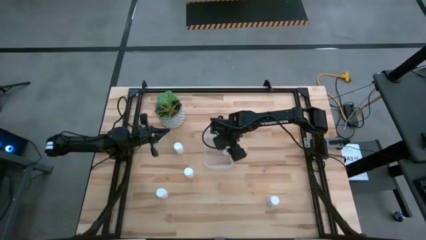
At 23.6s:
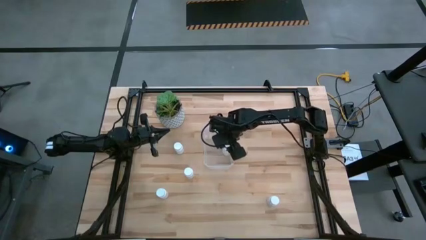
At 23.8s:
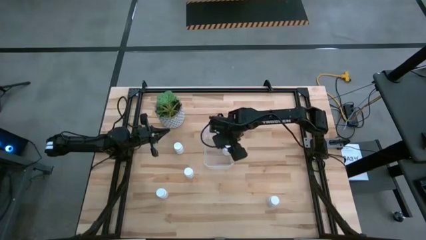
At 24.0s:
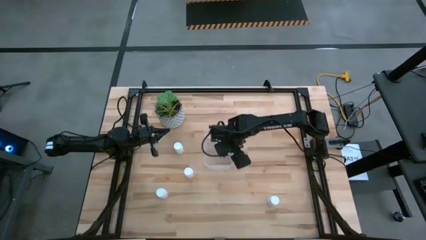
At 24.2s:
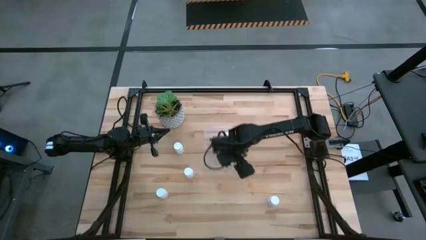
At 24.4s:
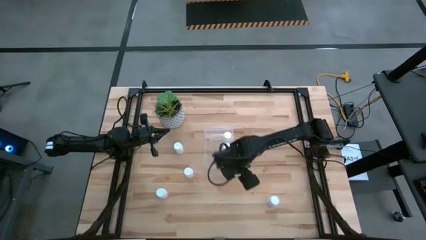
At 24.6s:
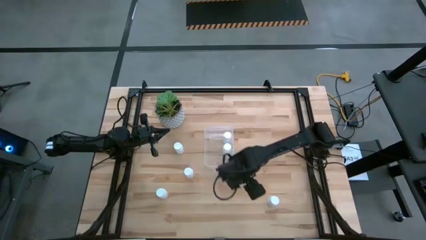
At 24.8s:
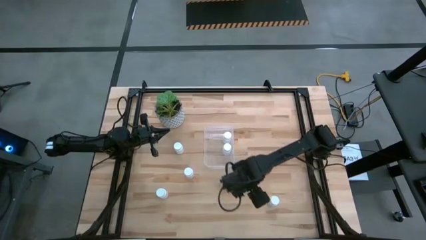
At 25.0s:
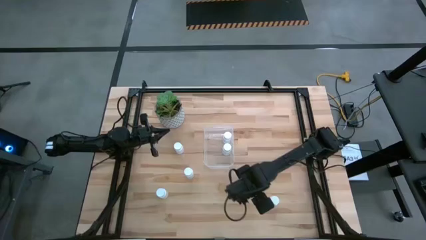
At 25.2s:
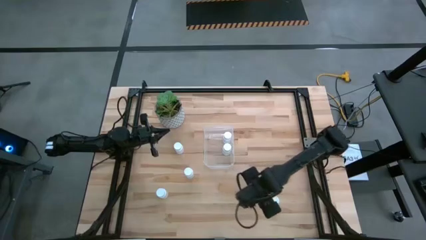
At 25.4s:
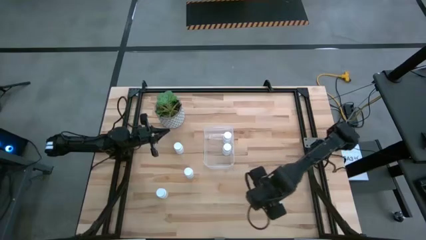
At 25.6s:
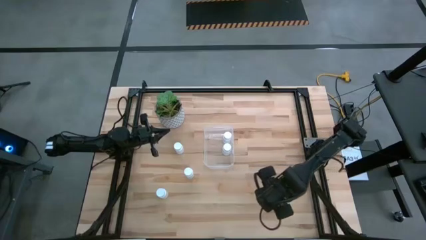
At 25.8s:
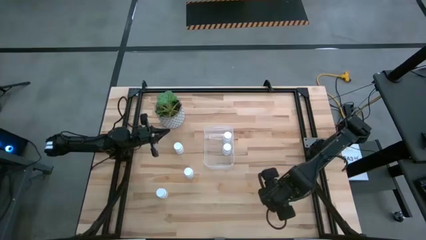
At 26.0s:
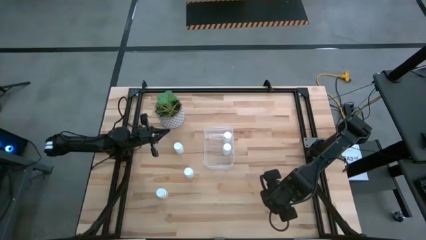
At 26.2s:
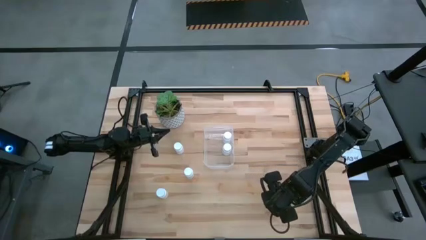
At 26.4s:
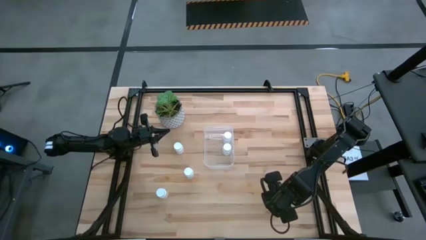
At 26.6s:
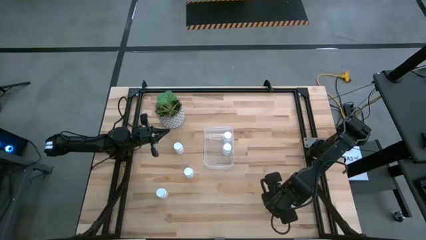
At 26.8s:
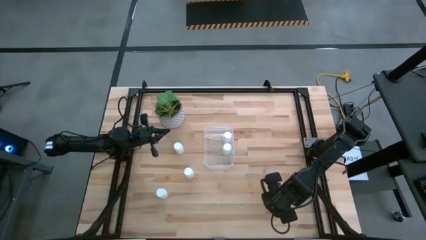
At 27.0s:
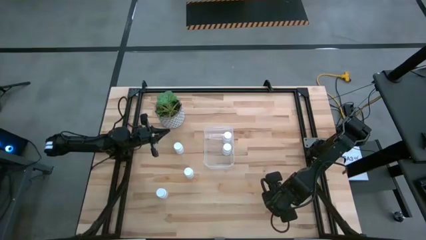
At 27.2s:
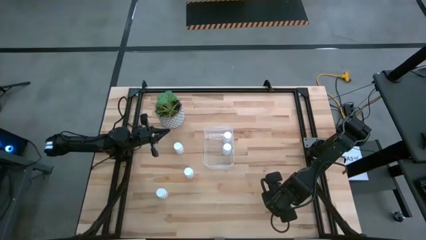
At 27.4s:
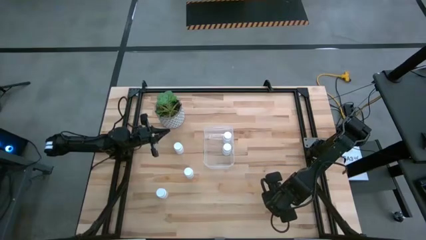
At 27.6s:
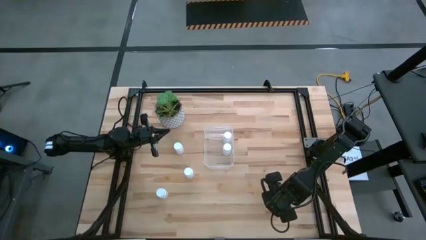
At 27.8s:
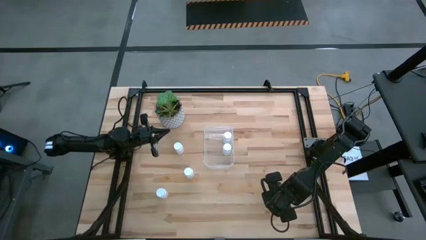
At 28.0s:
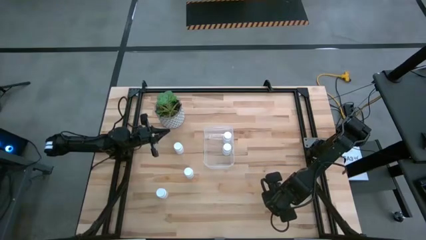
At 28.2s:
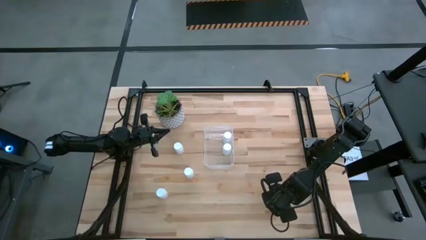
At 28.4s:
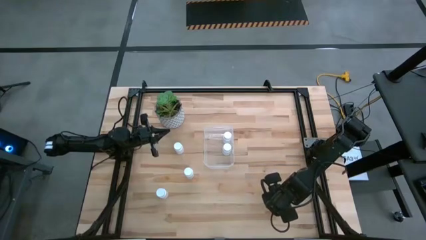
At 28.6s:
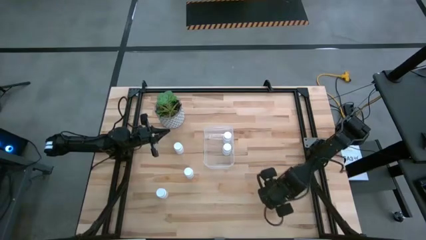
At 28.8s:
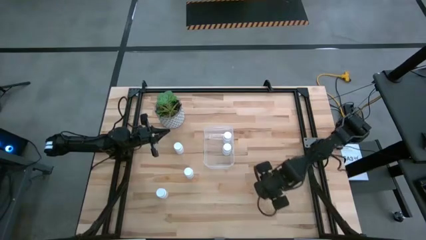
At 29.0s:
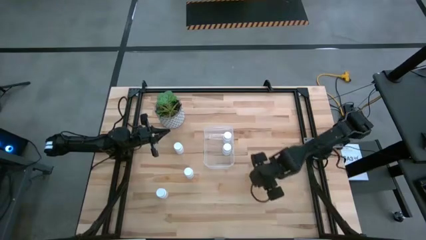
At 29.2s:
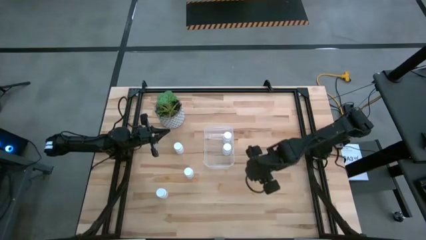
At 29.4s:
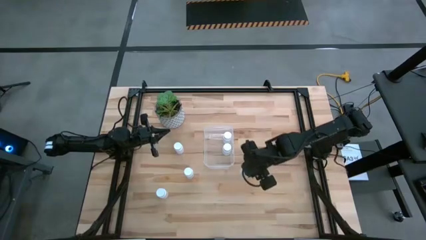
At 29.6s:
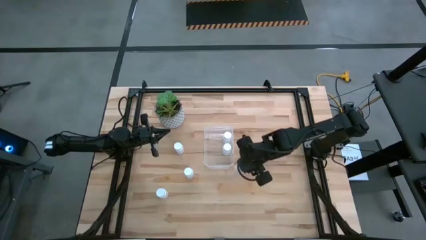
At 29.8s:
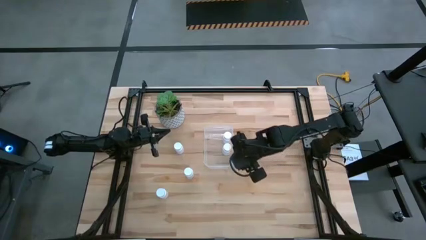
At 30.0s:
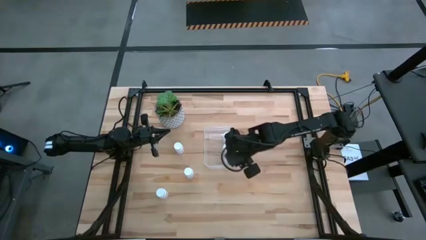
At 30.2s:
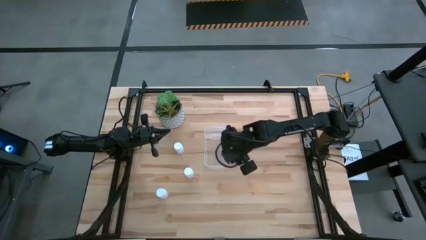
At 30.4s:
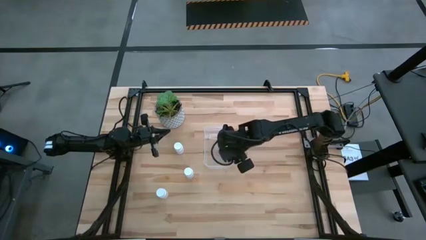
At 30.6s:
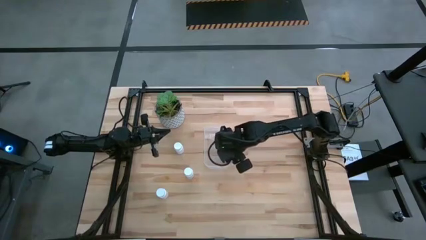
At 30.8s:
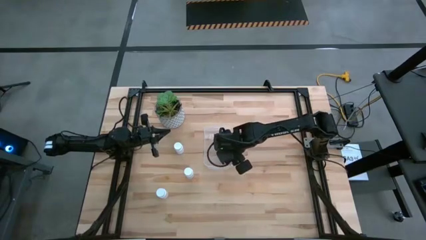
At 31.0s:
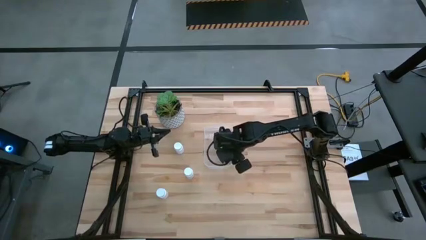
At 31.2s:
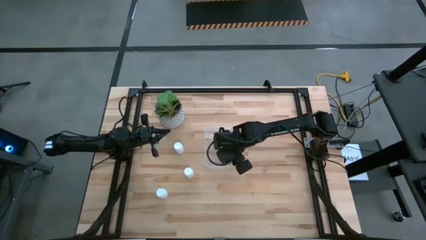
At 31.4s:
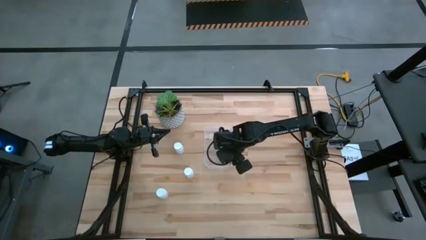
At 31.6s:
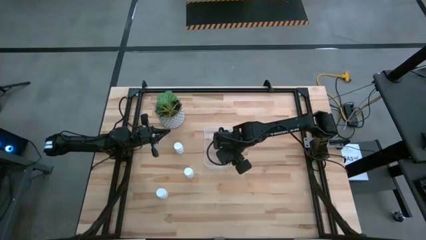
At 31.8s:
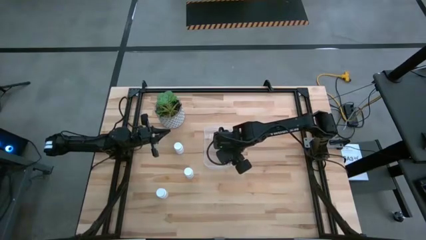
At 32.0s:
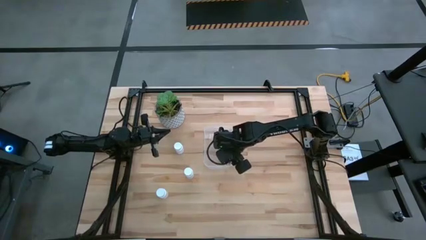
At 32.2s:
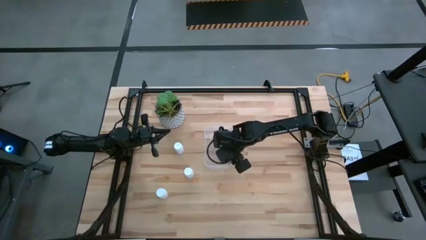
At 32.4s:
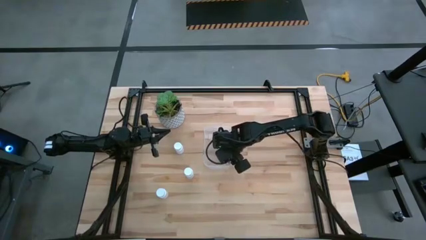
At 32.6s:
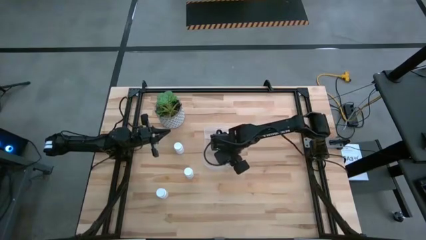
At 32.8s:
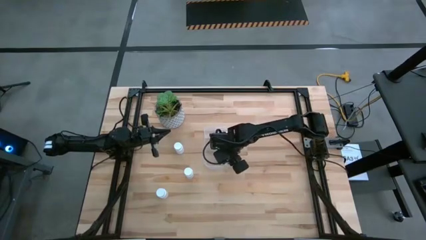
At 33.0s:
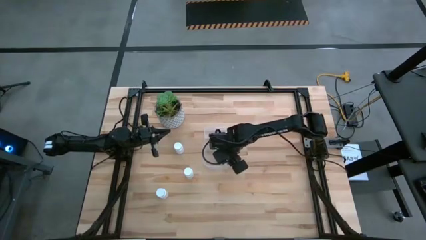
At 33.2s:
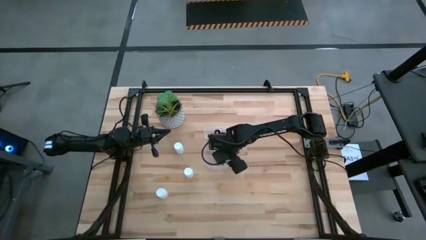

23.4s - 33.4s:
Task: Pick and place pill bottles into a basket
Put the white pill bottle into the transparent container

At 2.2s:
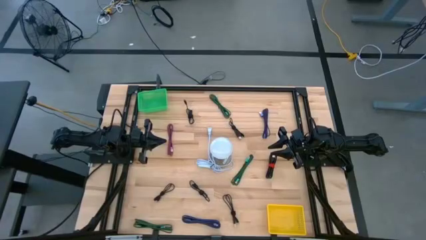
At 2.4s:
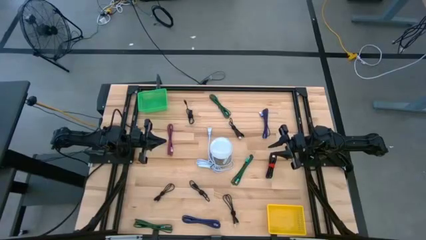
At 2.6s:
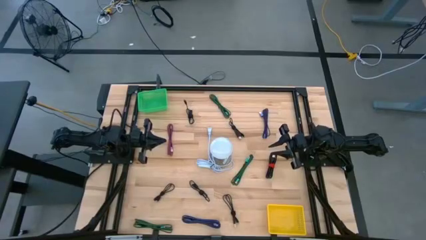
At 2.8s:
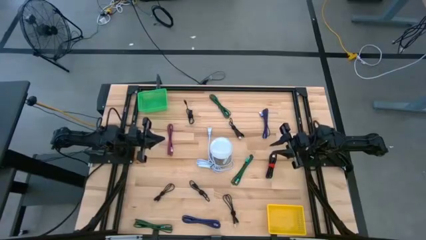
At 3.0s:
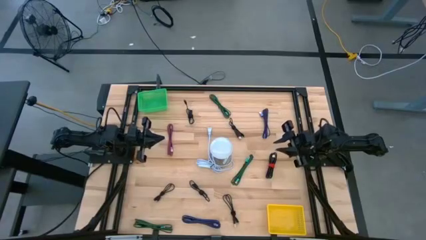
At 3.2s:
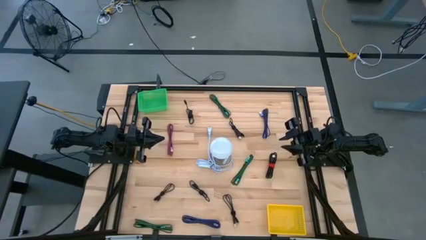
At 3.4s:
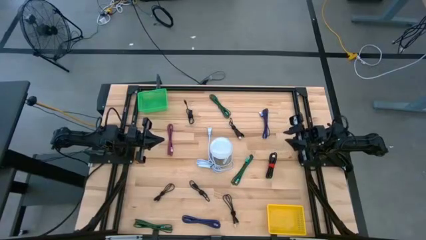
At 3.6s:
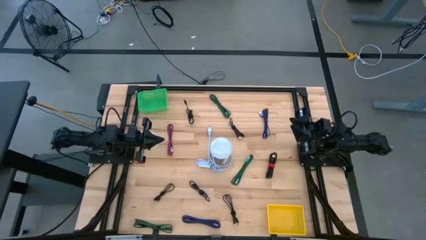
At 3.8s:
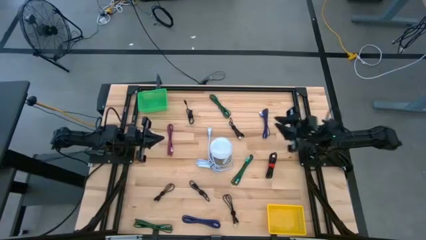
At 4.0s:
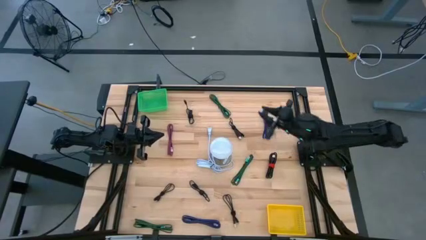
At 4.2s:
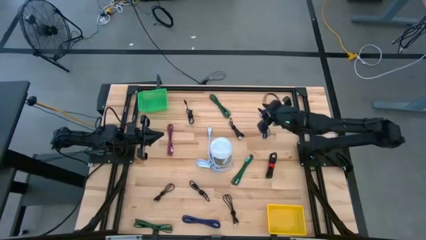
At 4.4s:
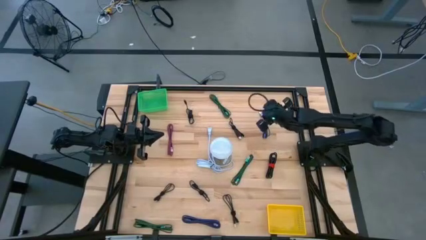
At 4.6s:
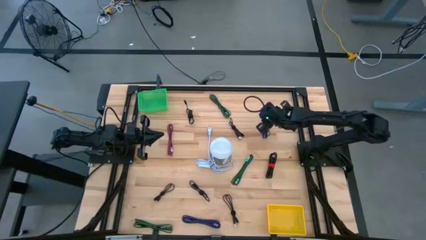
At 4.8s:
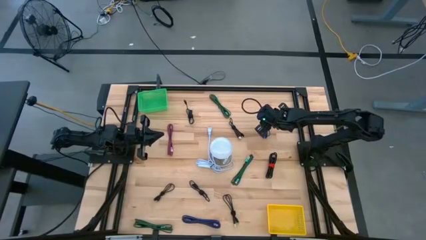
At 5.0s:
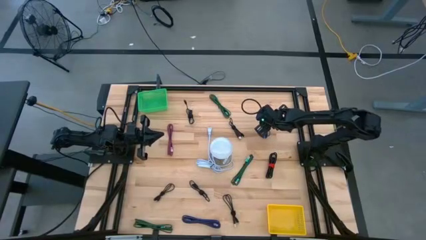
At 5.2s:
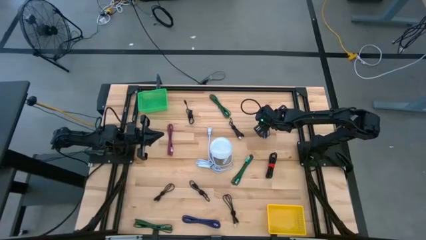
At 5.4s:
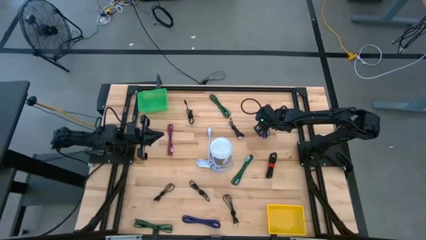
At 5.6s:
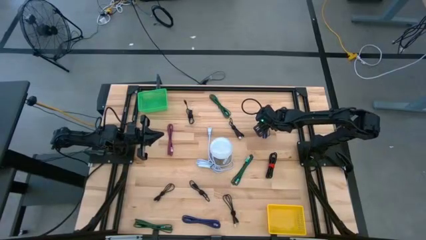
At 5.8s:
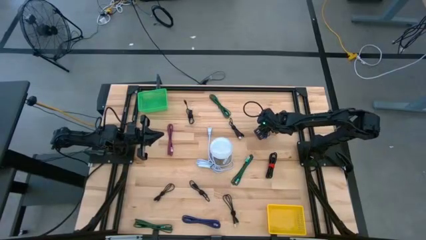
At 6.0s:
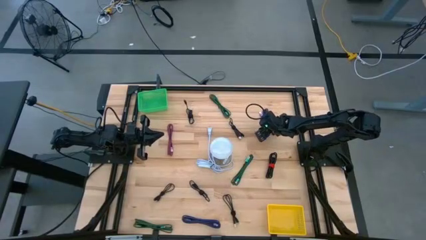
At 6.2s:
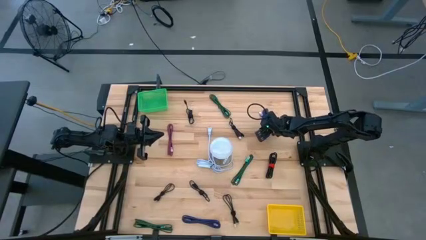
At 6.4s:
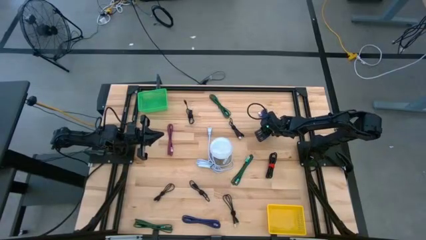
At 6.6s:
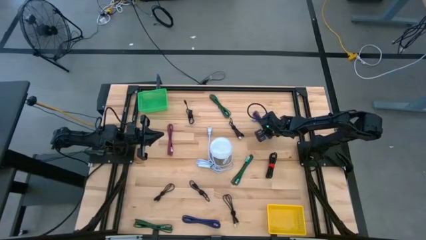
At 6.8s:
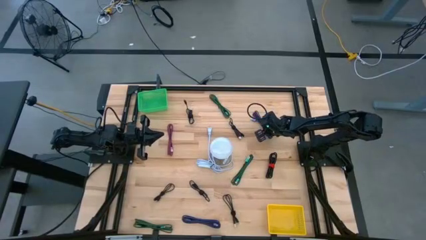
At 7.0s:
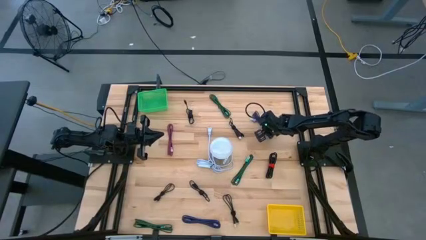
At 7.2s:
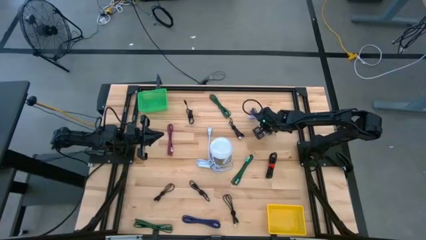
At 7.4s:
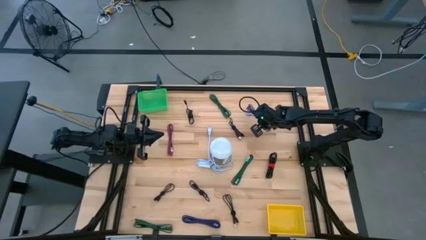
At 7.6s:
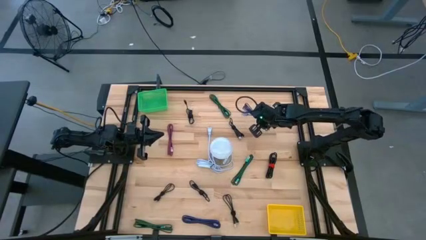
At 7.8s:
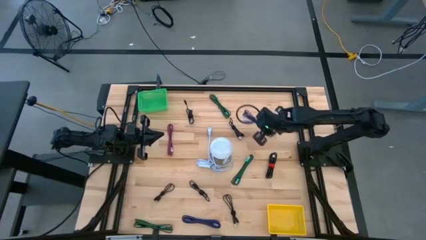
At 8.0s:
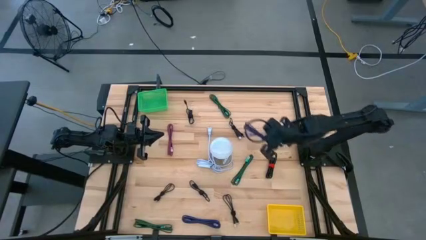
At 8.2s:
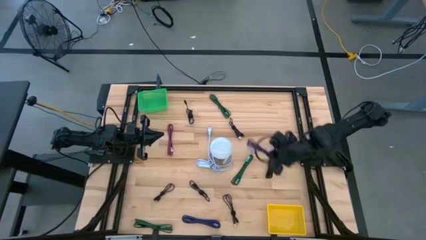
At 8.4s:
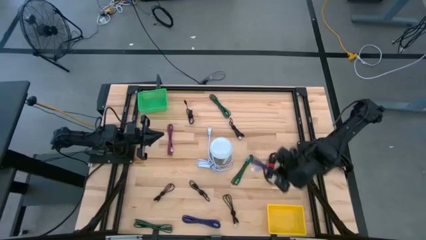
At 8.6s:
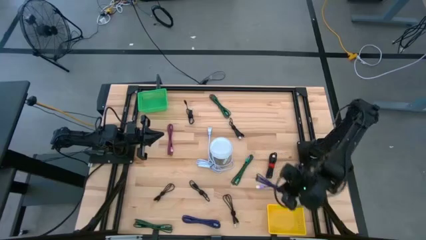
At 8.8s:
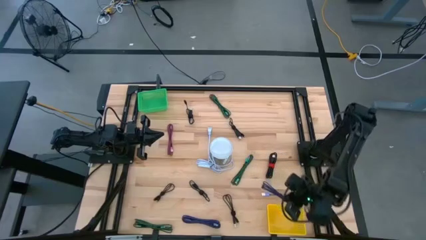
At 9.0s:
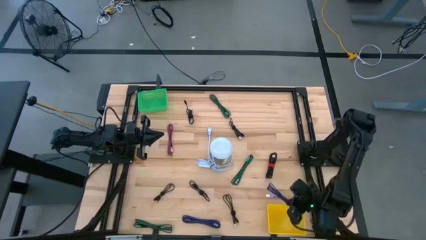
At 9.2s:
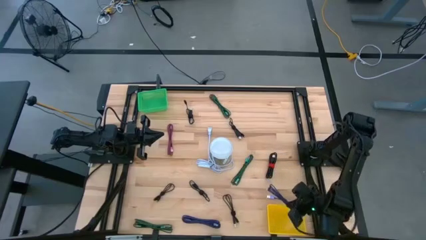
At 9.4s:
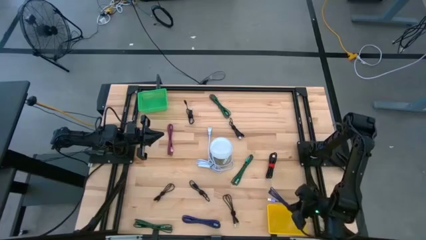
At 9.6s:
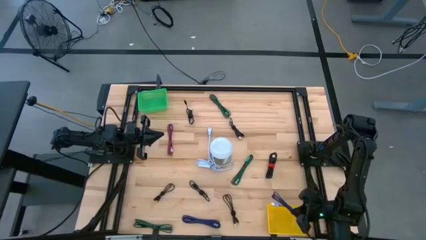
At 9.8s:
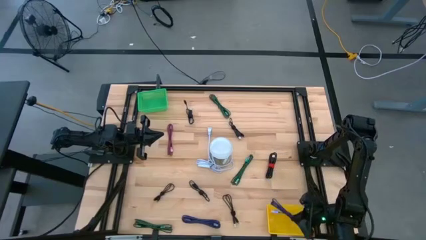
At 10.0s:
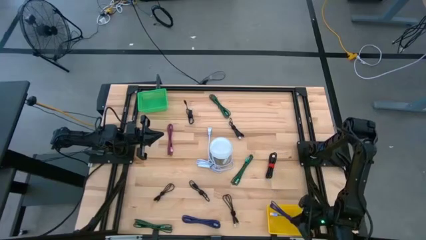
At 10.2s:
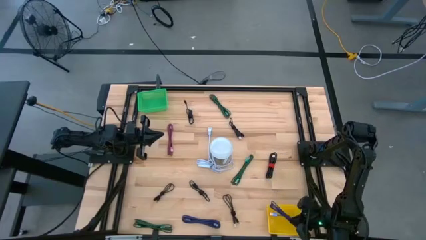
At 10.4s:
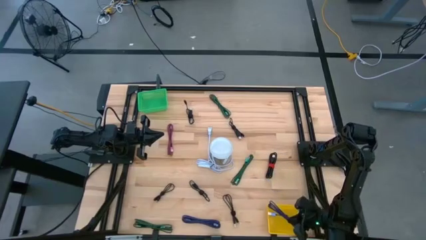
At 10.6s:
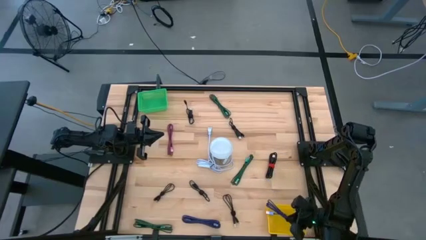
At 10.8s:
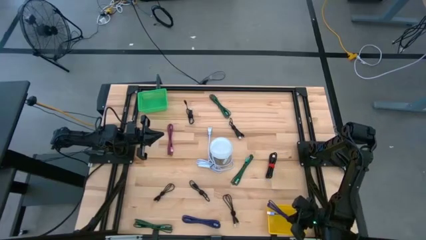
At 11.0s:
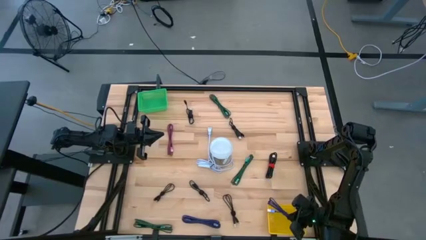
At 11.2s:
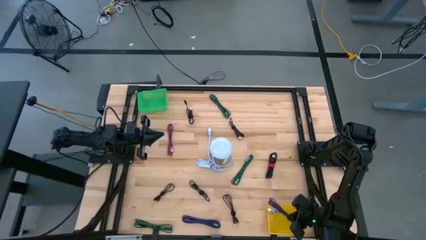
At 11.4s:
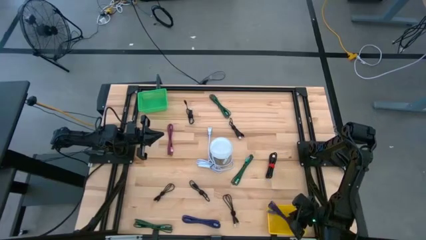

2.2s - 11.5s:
Task: Pick & Place USB Port
Put the blue black charger cable into the yellow basket
